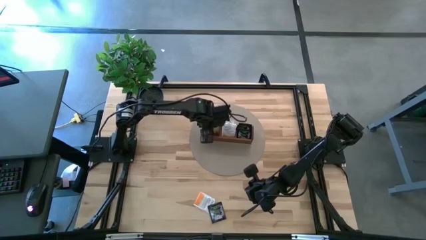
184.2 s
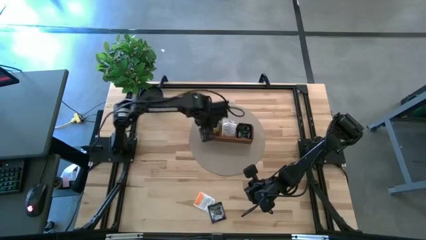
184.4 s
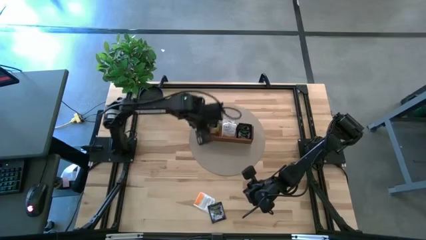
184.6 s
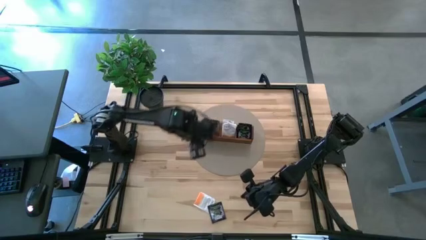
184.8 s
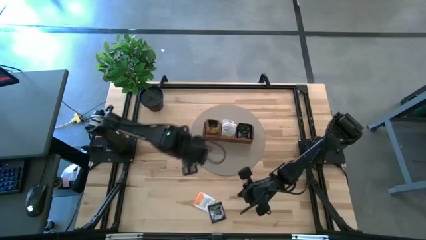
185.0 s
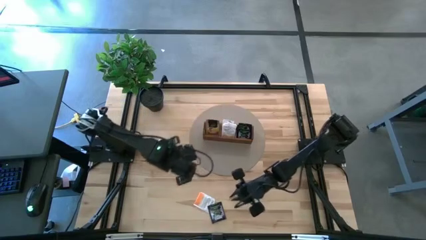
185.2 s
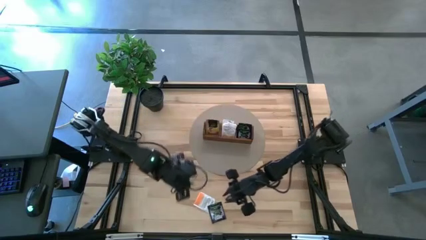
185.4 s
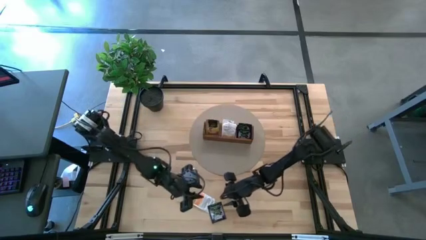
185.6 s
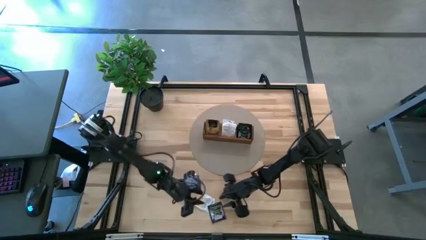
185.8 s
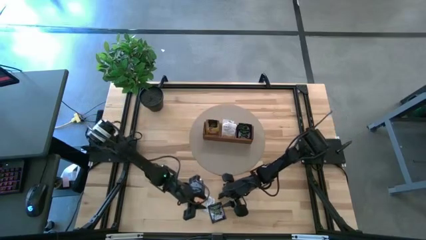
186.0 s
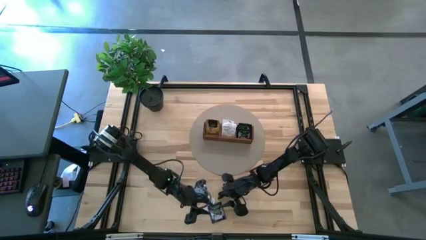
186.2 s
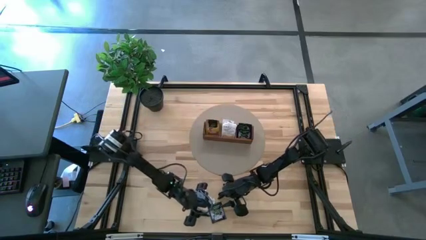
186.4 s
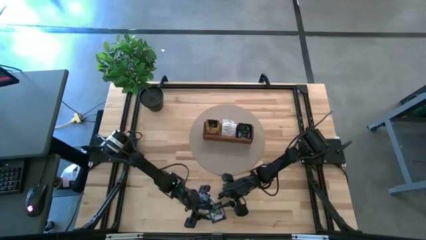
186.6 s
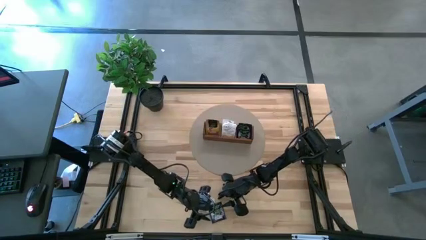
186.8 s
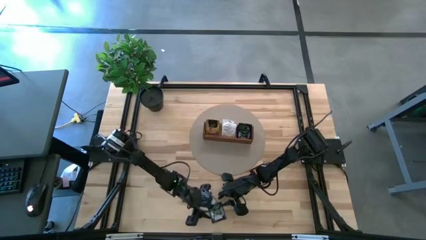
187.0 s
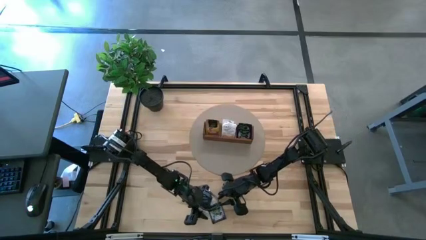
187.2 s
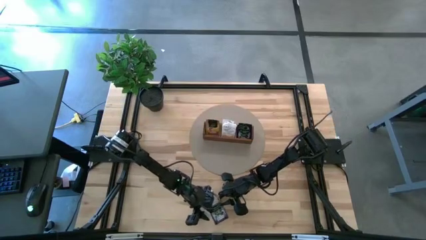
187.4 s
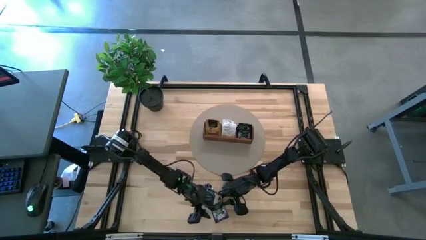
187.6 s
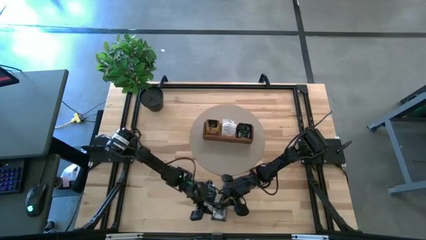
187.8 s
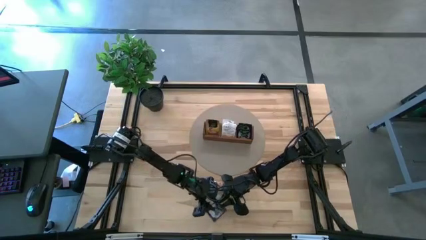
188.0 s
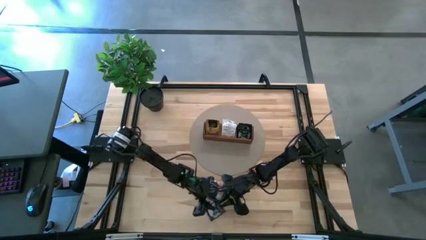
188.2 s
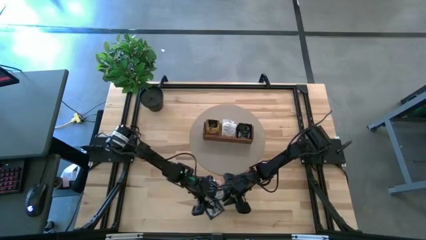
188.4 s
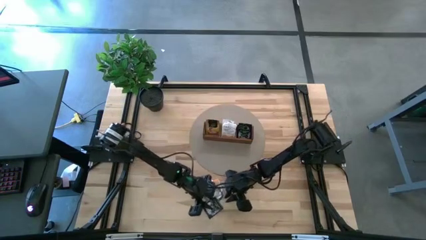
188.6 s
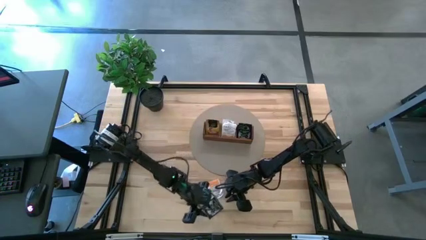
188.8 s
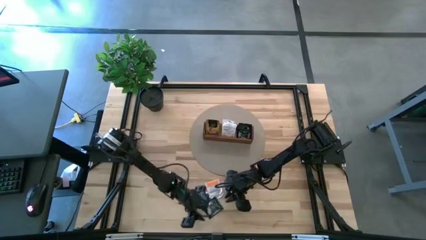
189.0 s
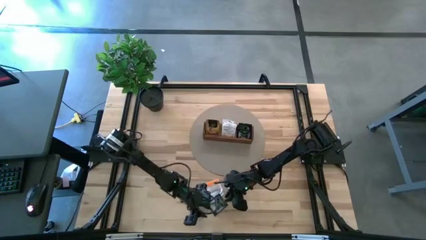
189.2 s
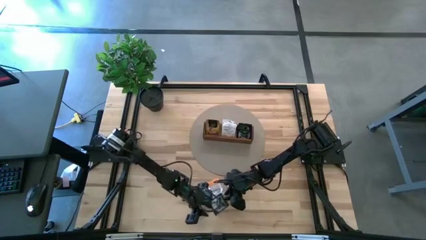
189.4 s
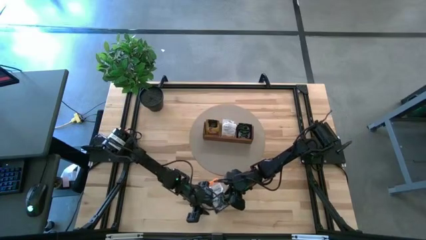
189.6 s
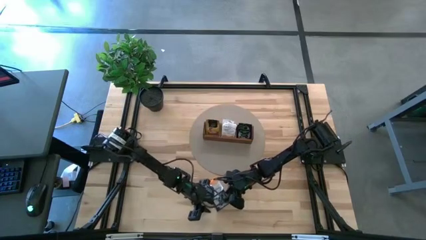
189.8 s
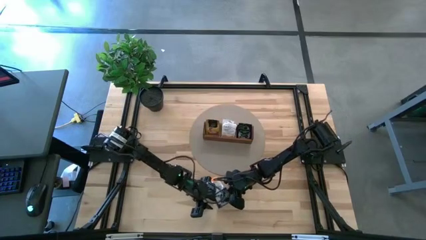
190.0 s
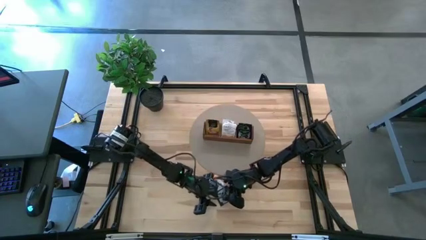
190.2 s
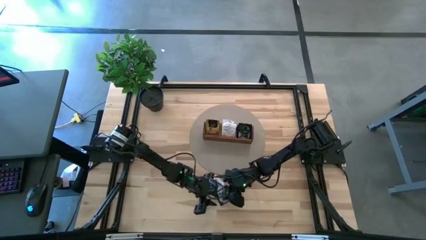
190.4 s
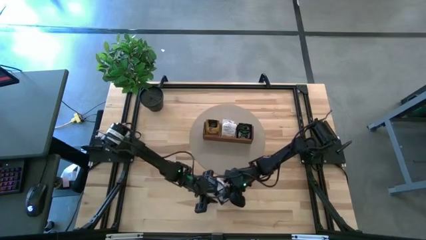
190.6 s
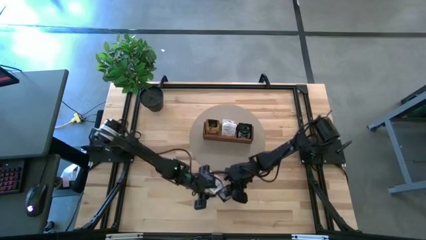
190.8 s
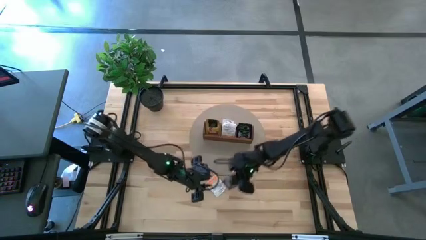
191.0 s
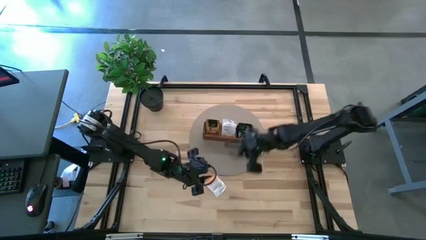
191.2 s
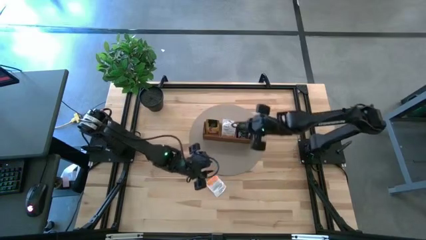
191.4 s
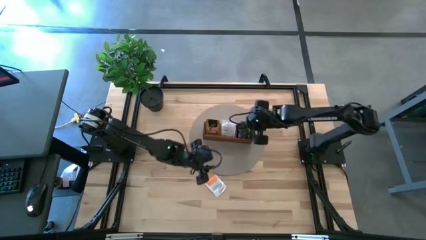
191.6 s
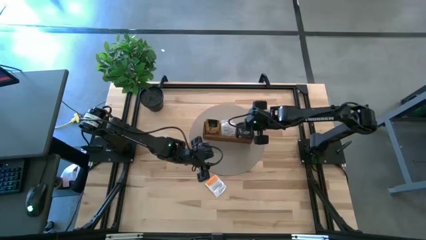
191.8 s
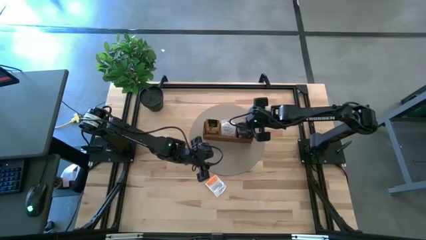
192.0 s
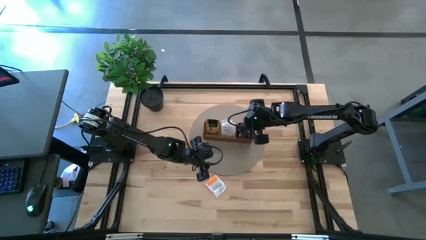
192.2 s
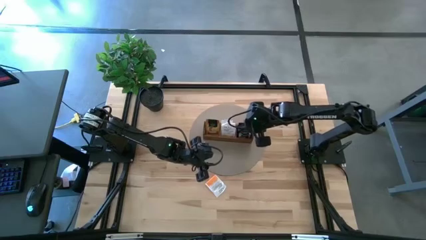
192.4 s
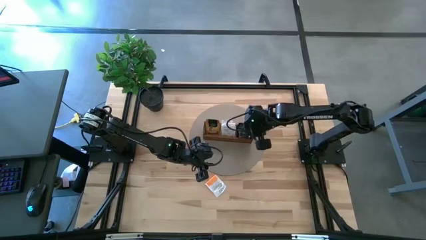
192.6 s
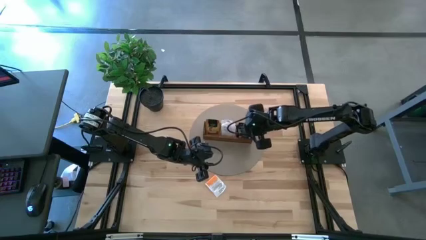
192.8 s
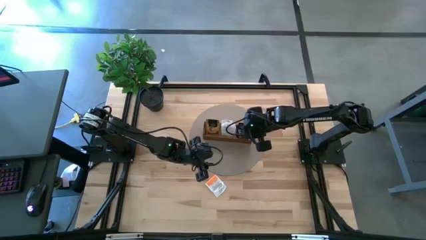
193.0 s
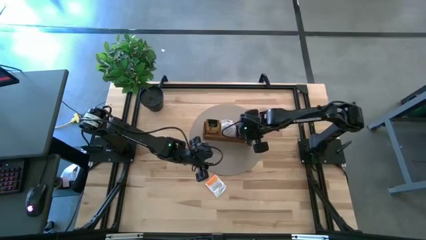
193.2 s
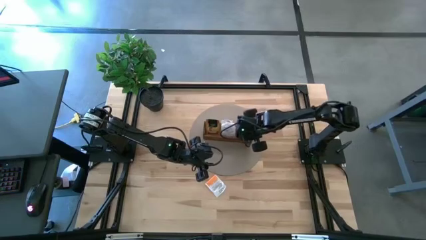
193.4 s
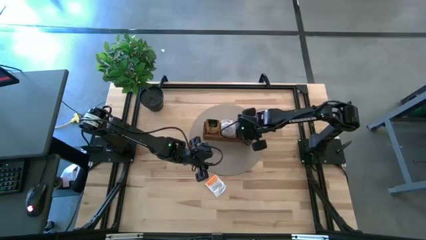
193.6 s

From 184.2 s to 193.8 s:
Task: Pick & Place Tea
Put the purple tea bag into the right section of the wooden organizer

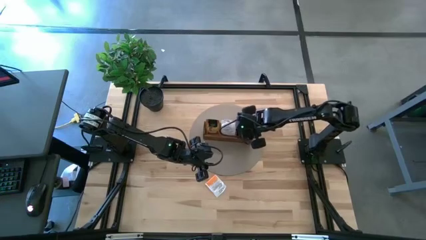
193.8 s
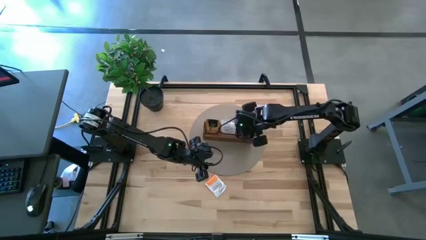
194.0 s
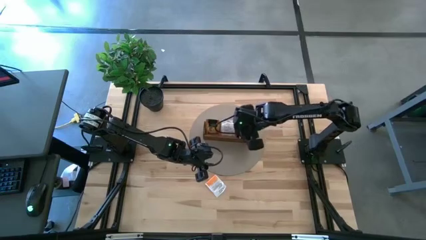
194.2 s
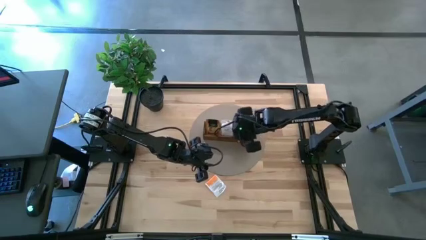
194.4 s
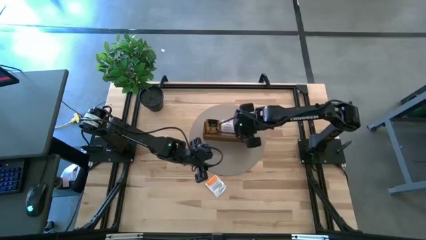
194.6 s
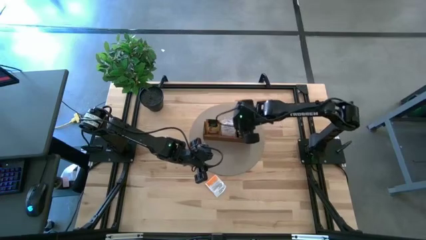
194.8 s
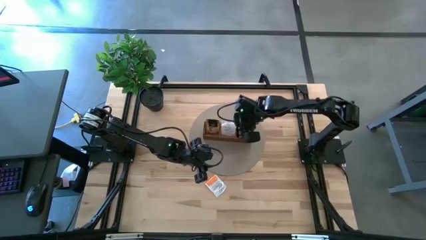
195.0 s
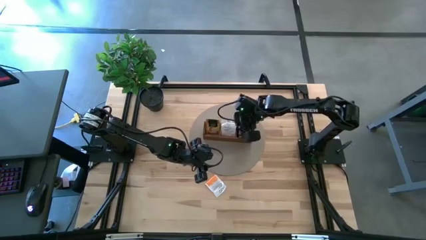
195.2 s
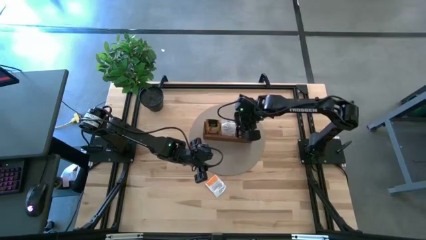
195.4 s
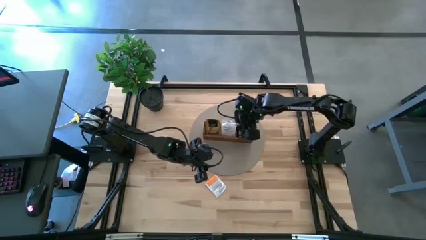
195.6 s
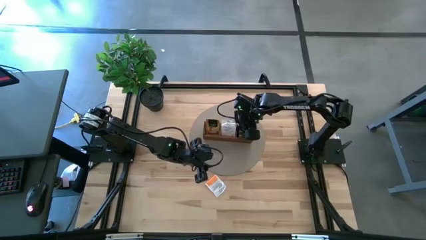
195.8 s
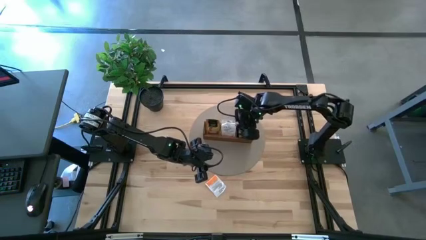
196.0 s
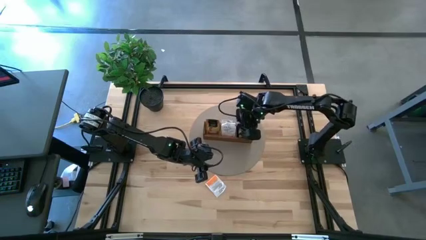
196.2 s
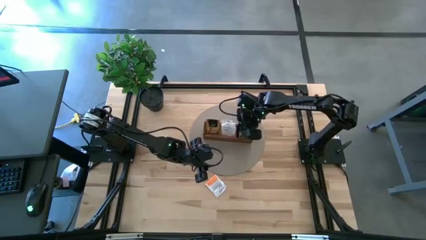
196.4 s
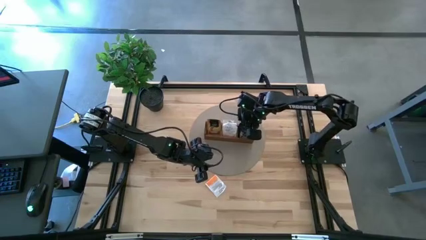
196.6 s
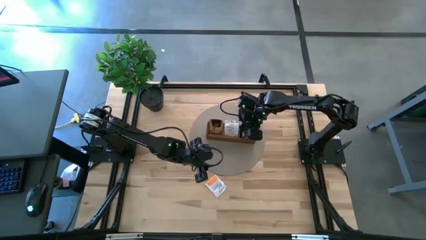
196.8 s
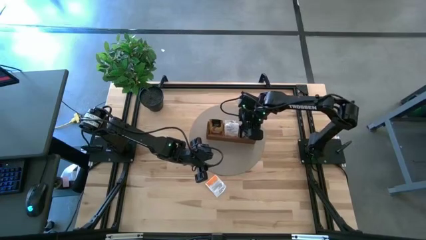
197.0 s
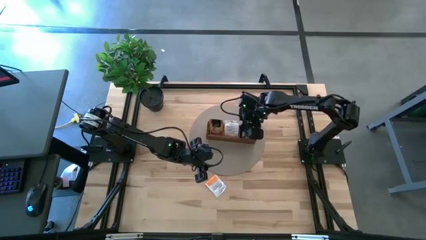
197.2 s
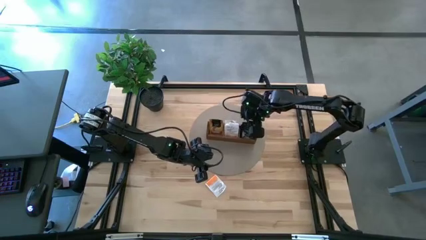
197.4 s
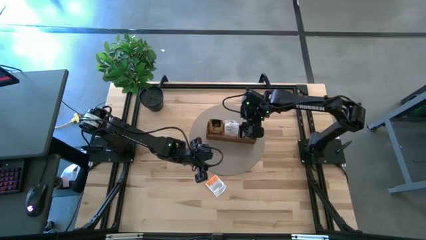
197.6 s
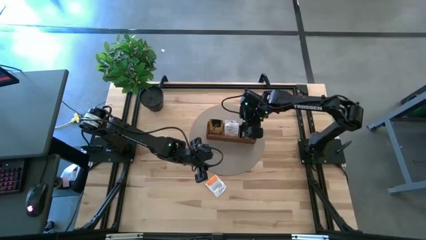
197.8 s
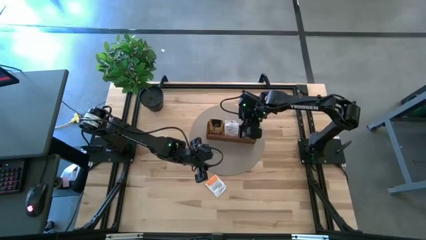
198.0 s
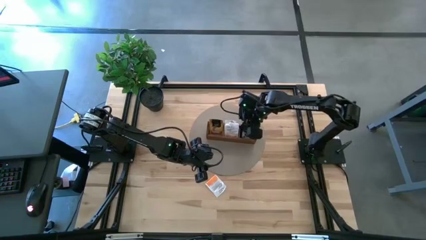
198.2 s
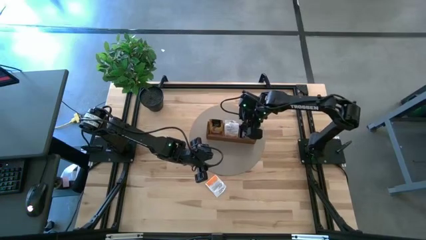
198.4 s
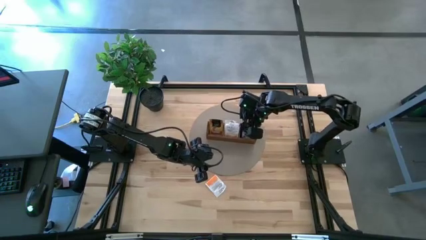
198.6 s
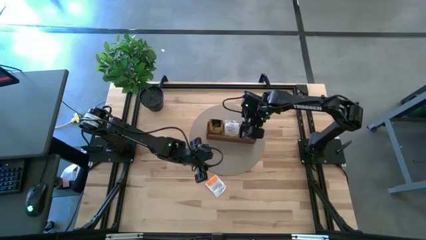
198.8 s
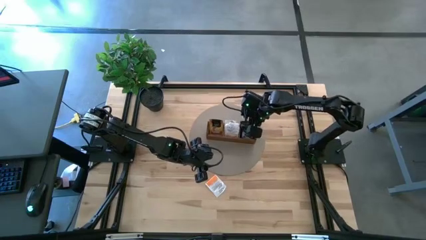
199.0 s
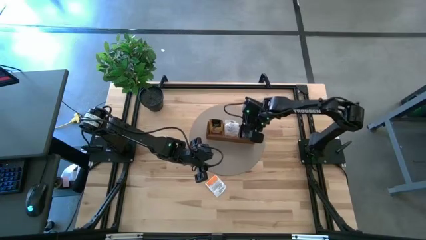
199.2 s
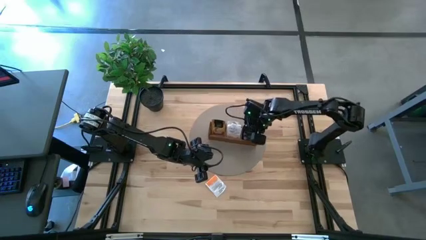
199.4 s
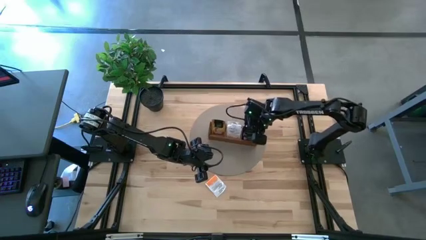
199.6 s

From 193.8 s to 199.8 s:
Adjust the purple tea bags in the wooden organizer
